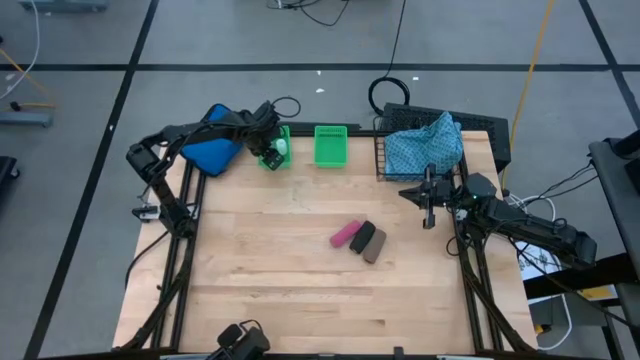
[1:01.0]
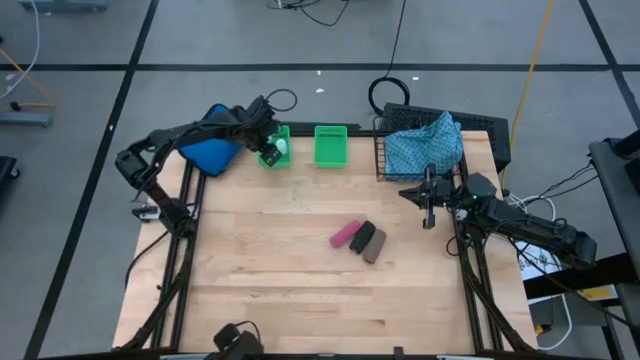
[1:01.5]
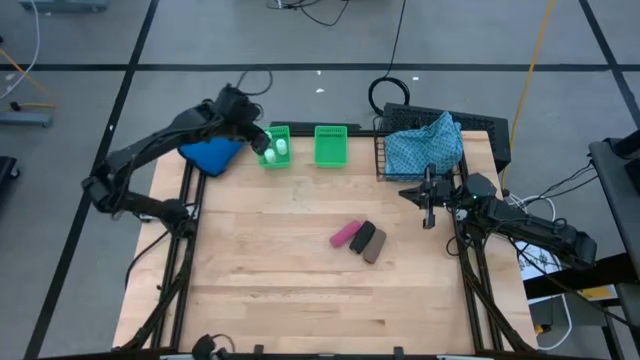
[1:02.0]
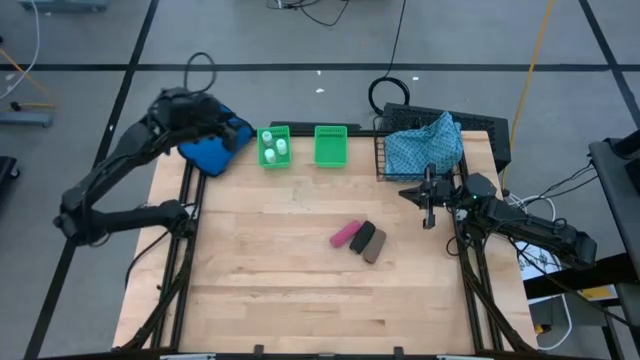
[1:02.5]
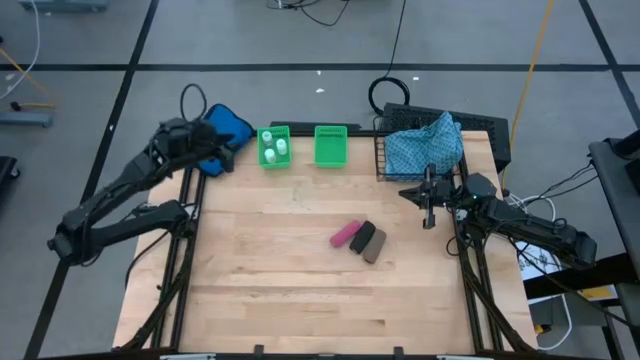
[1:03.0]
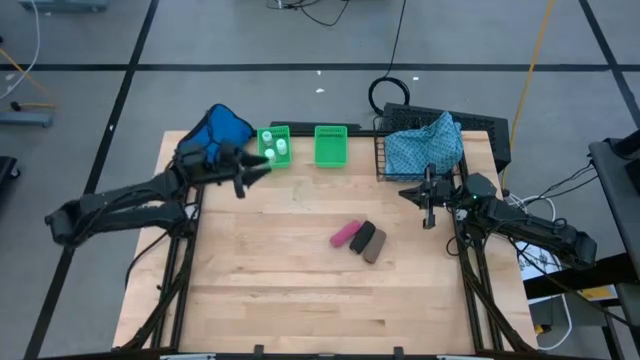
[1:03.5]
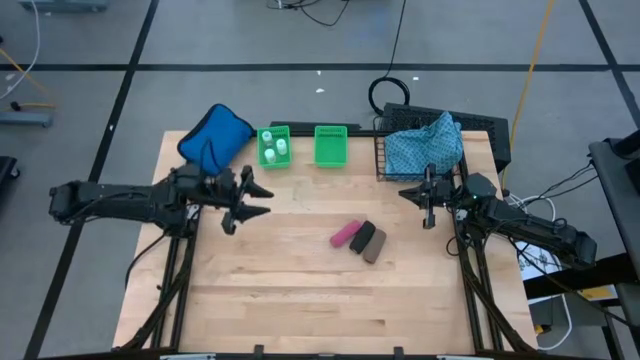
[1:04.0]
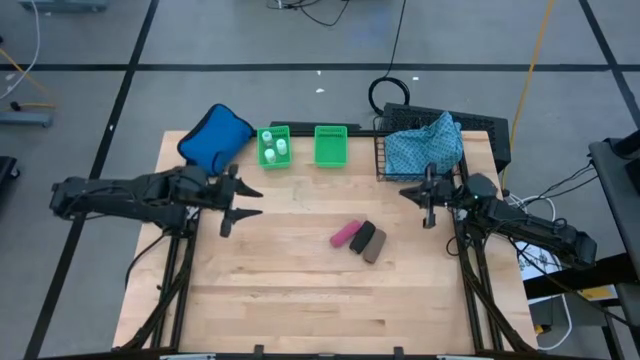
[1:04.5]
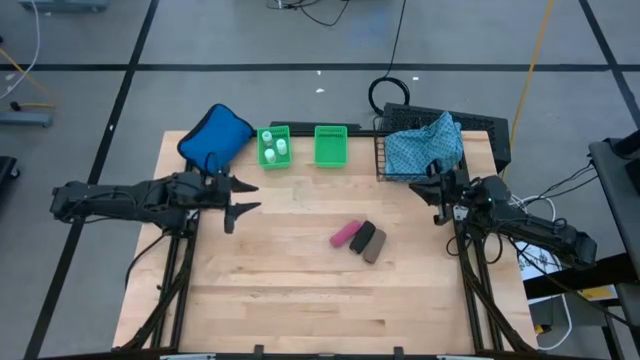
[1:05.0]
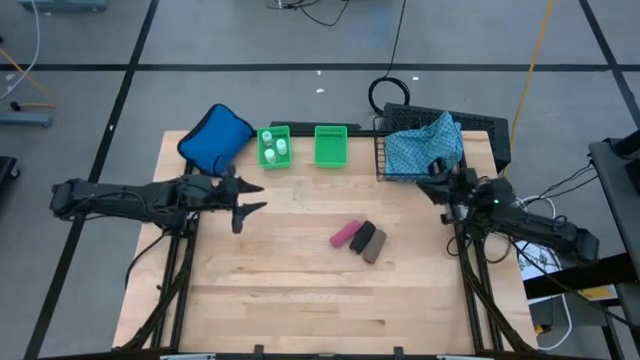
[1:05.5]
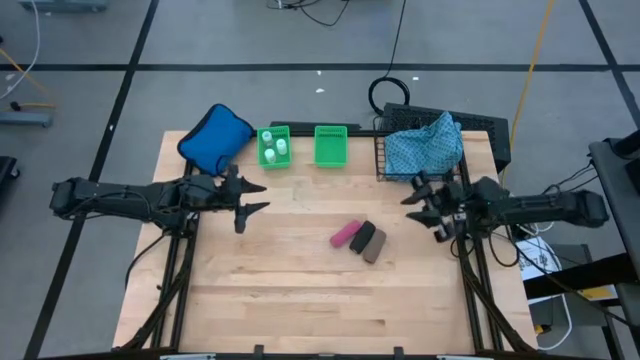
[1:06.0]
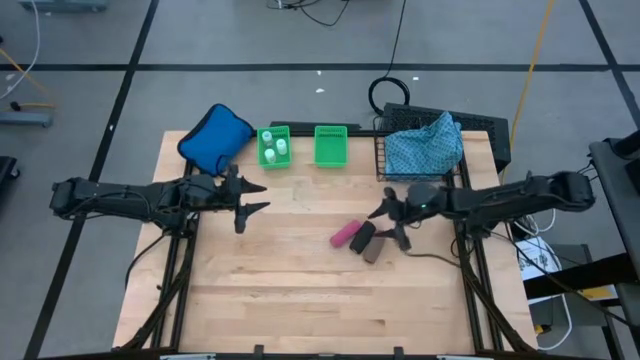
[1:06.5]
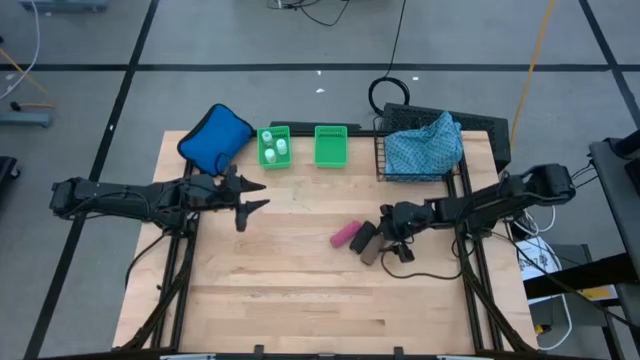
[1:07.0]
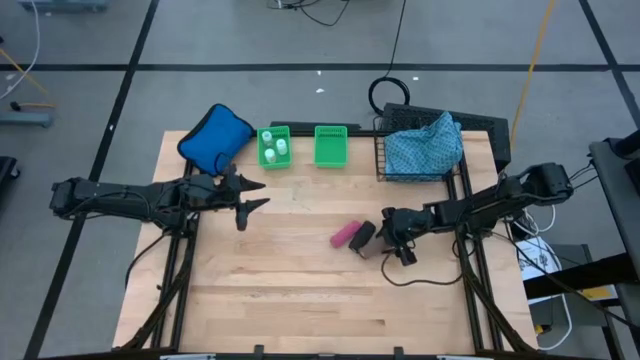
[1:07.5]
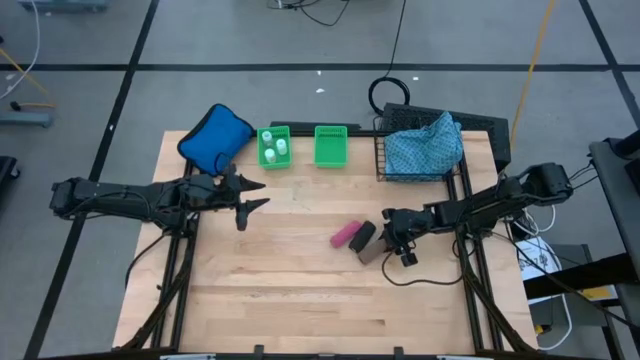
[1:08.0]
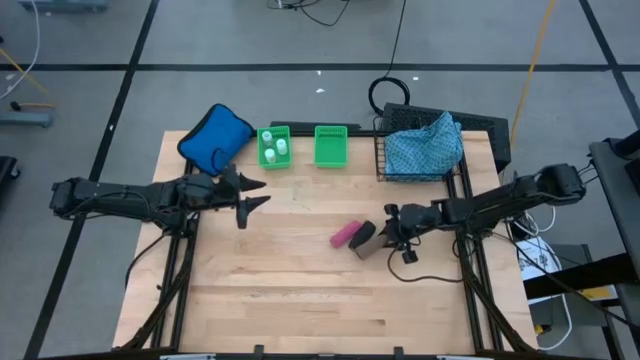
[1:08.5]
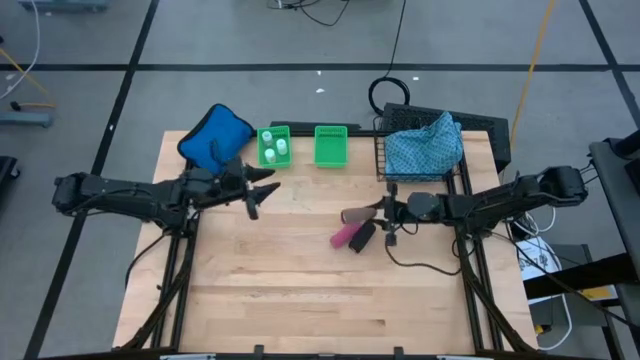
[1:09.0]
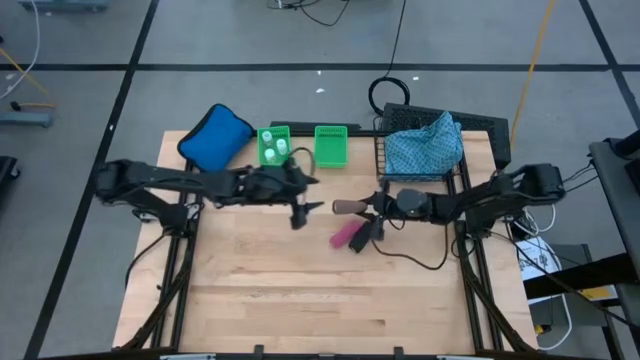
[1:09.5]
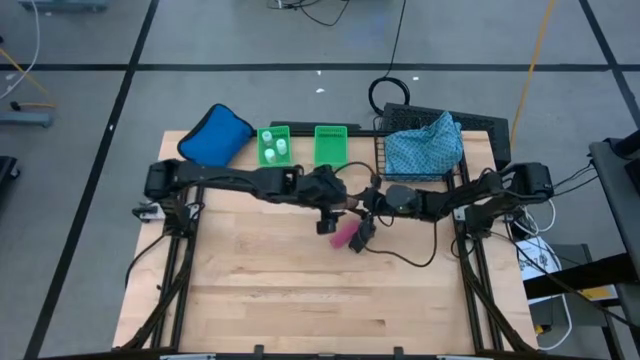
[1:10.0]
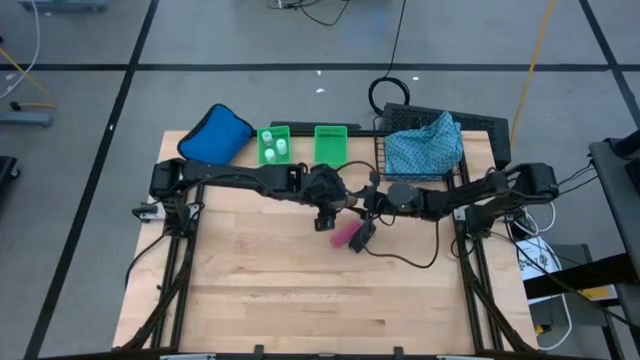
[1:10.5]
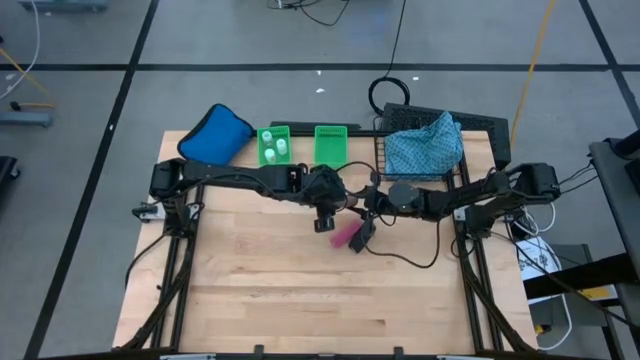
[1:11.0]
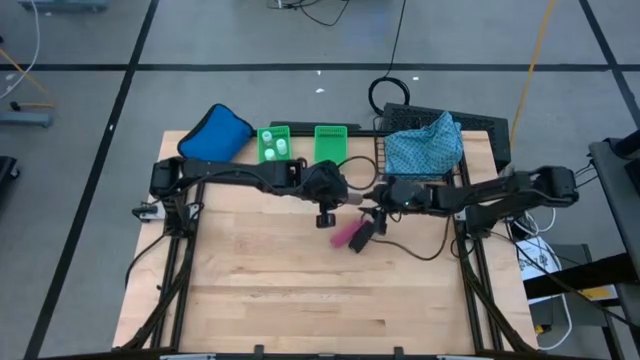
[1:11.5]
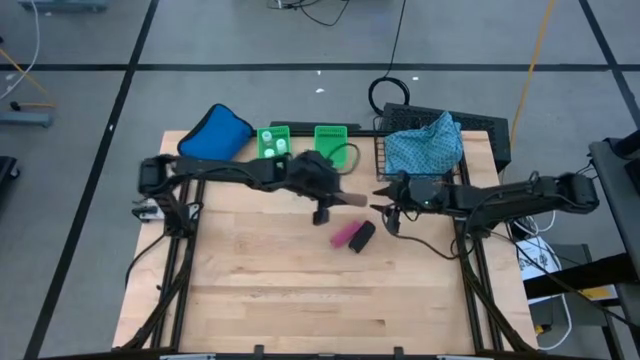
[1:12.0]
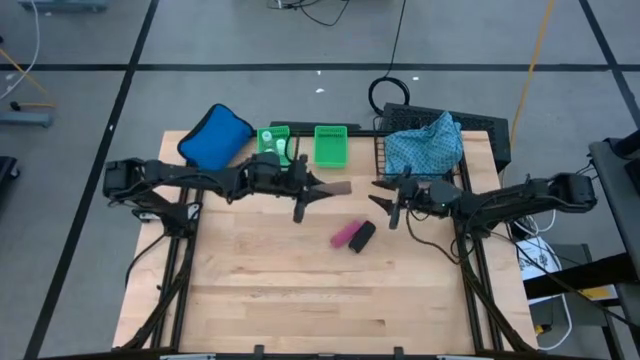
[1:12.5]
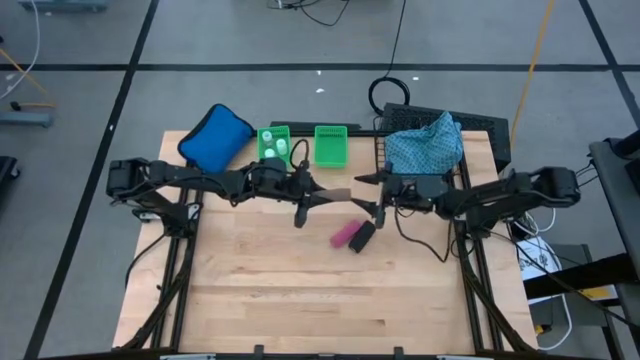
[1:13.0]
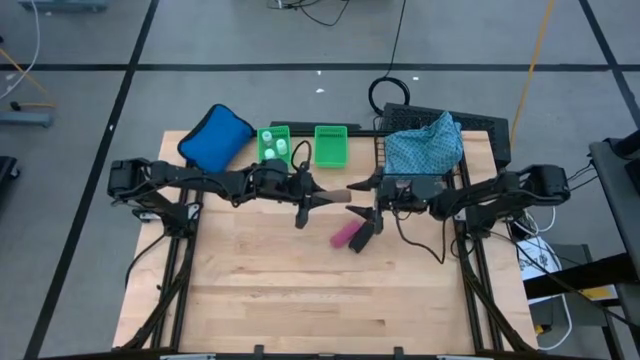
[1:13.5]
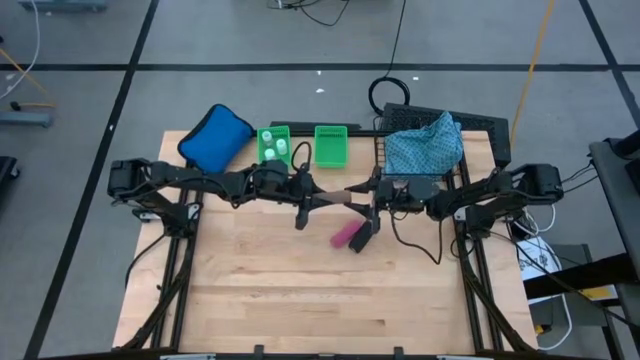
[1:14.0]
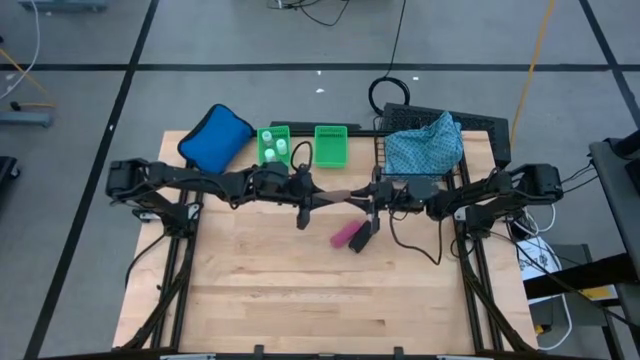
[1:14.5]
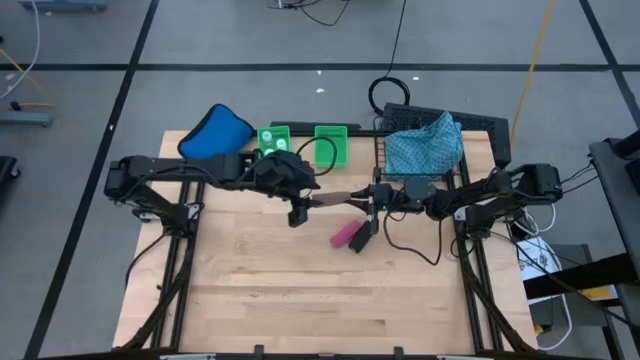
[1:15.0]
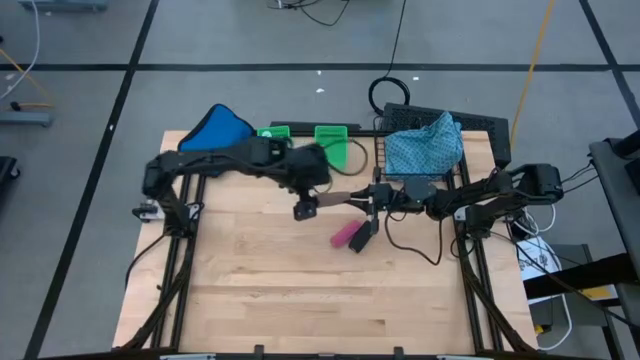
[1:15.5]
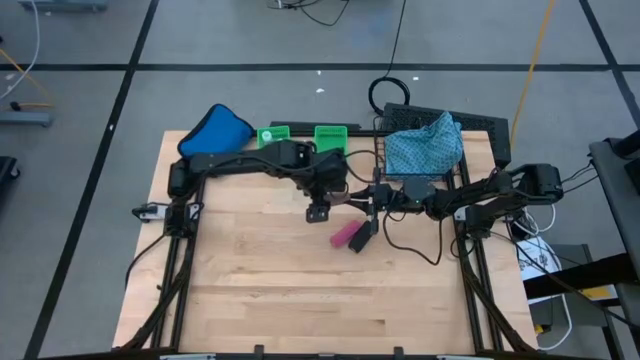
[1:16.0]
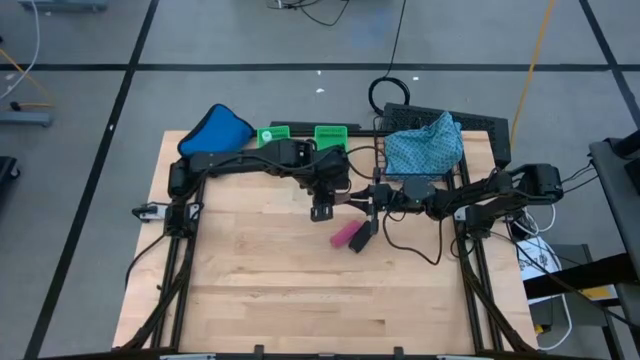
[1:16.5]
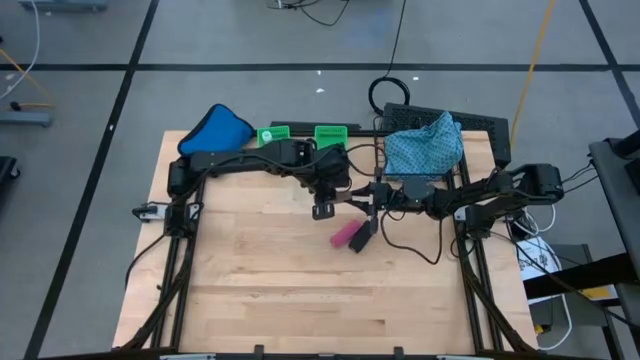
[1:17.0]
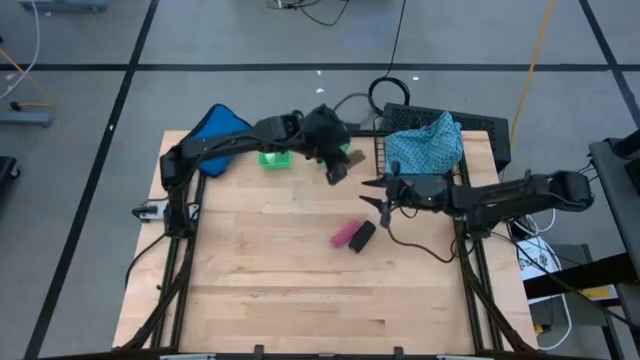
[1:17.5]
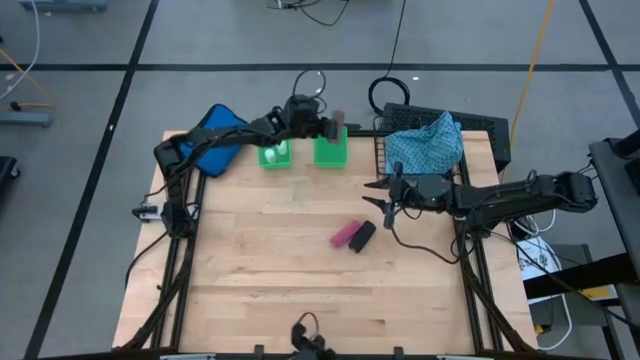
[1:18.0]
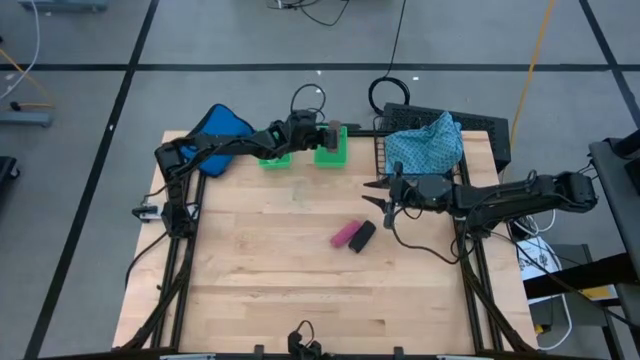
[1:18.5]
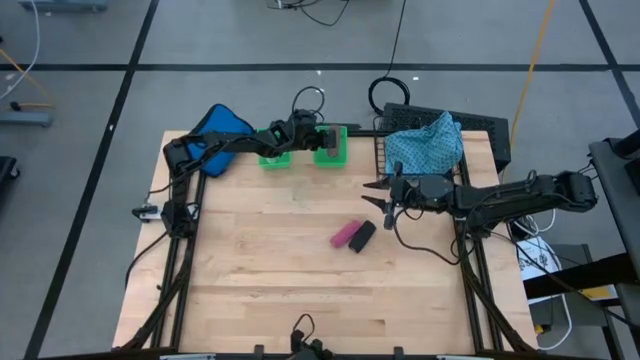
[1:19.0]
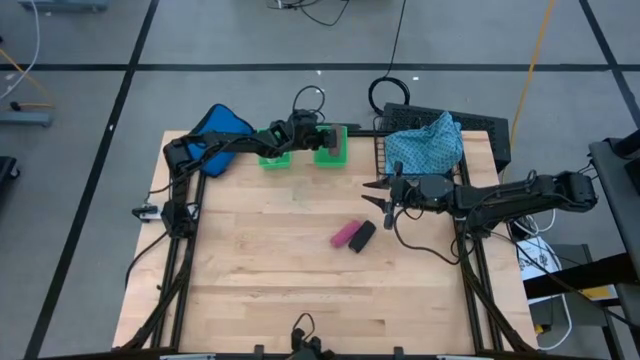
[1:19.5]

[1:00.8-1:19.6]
Task: Pick & place medical supplies in basket/bin
Put the brown bandage into the right green bin

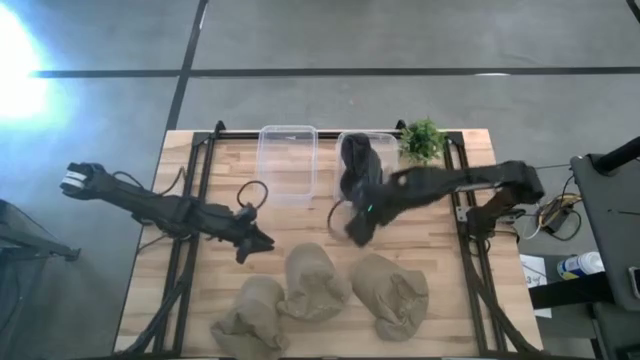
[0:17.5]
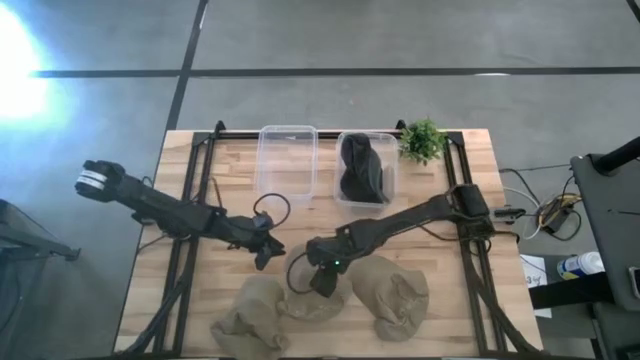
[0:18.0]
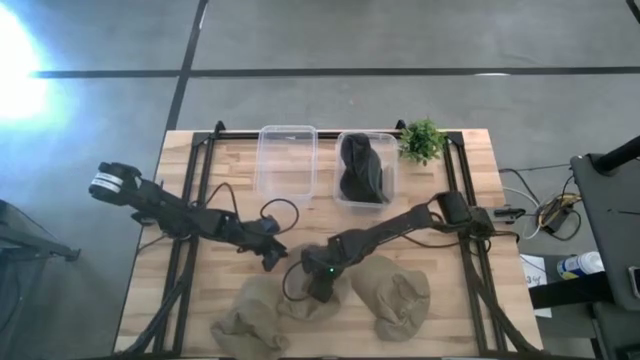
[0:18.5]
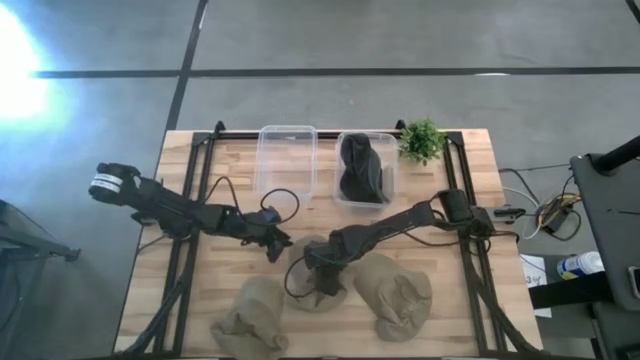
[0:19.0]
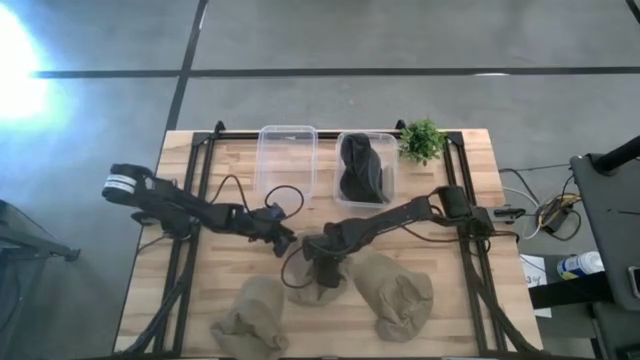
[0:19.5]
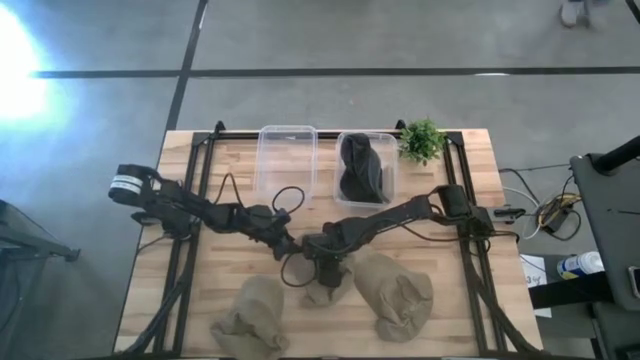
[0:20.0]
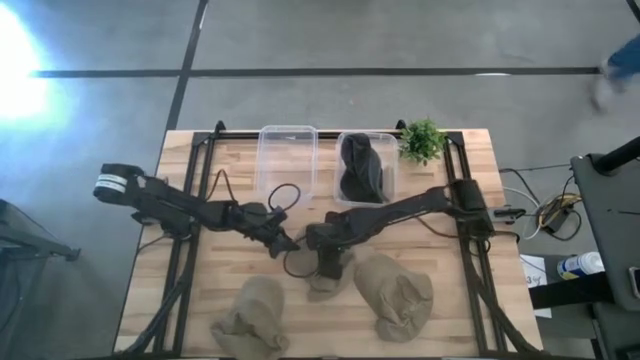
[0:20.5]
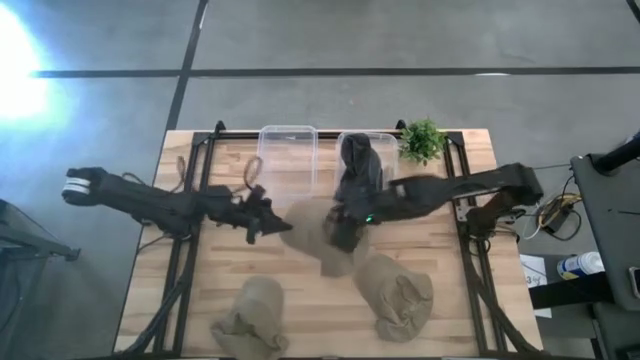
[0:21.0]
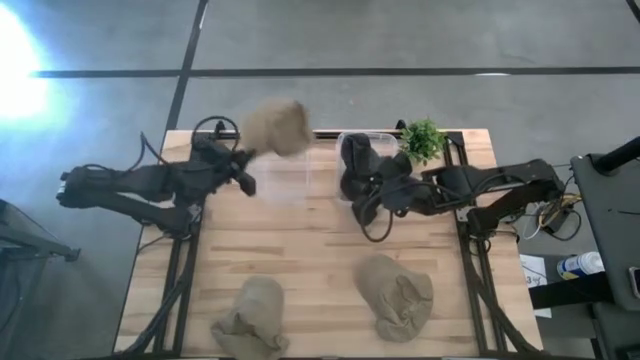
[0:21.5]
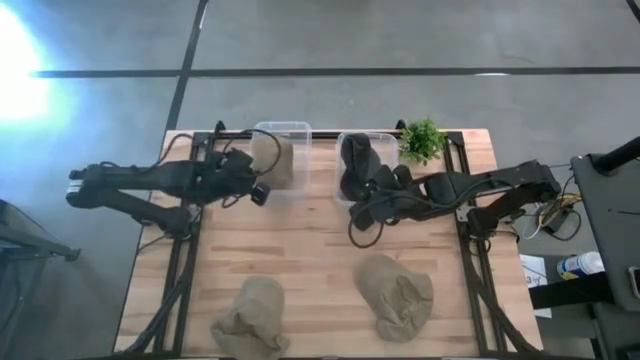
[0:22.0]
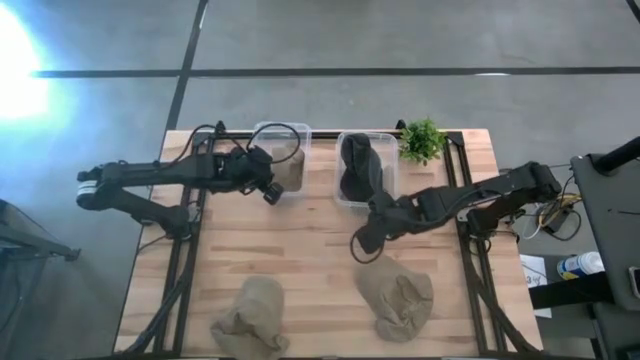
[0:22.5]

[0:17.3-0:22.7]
Task: Pick & Place hat
Put the middle brown cap into the left transparent bin
